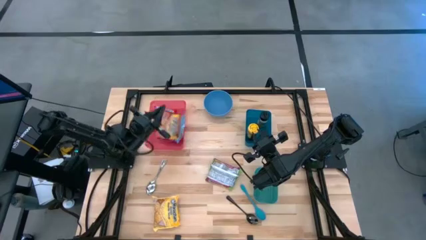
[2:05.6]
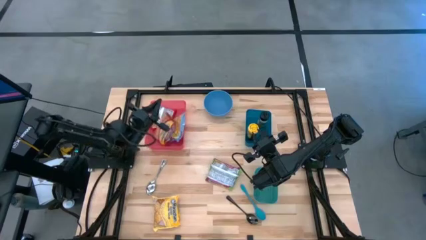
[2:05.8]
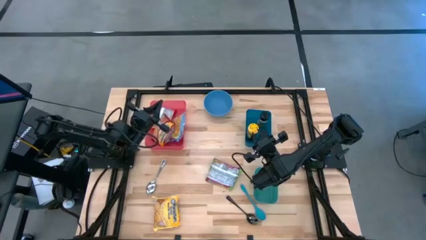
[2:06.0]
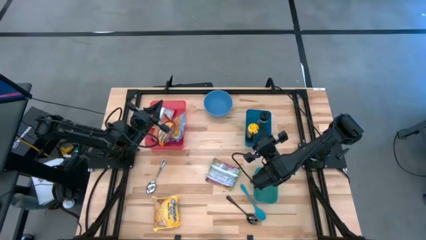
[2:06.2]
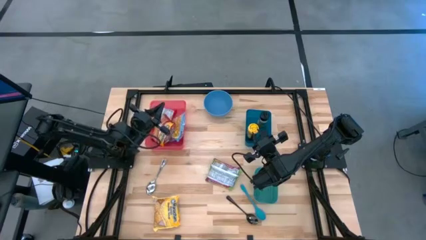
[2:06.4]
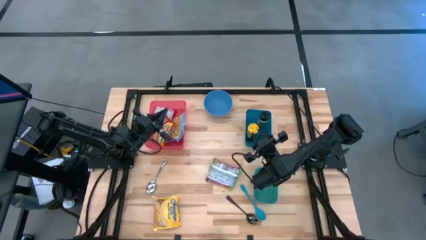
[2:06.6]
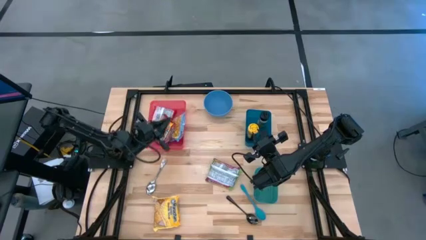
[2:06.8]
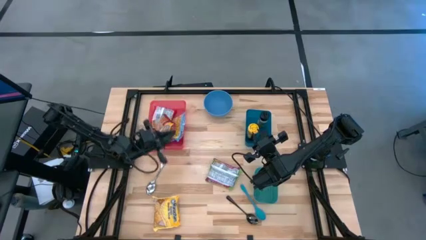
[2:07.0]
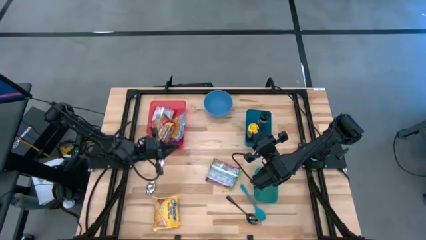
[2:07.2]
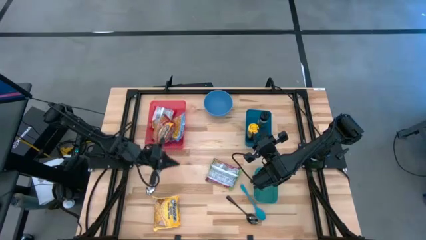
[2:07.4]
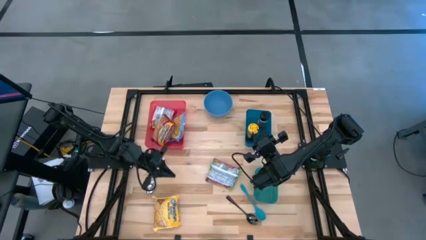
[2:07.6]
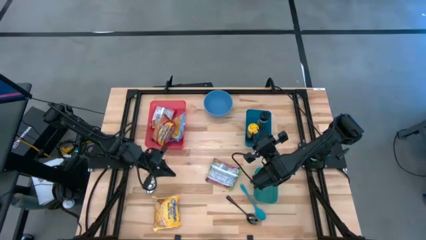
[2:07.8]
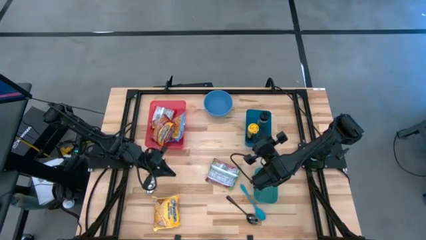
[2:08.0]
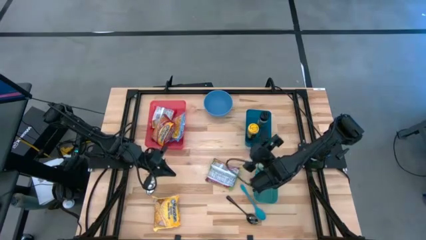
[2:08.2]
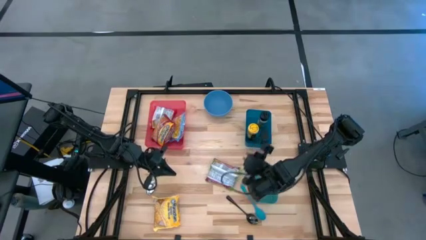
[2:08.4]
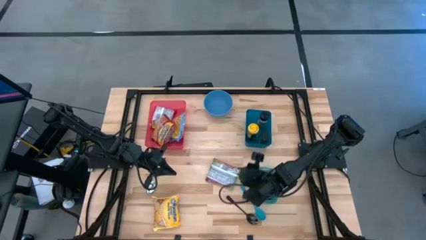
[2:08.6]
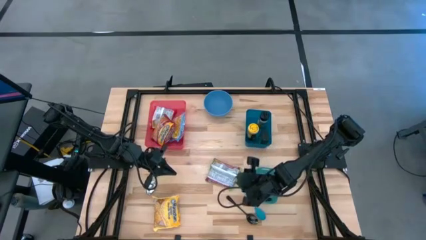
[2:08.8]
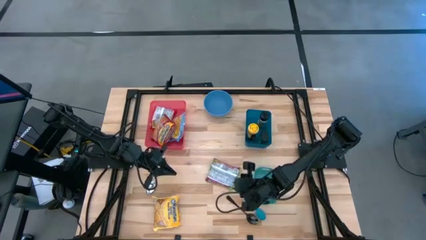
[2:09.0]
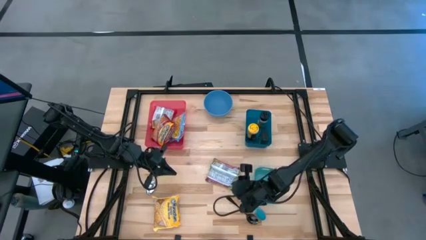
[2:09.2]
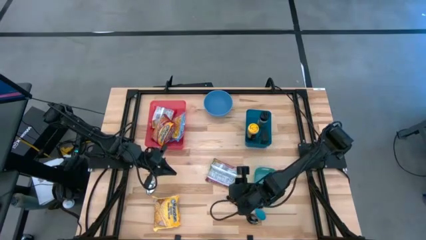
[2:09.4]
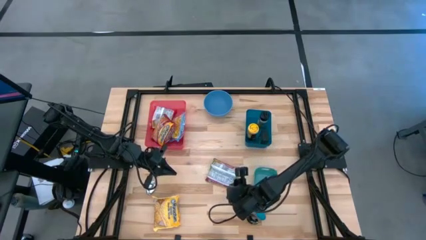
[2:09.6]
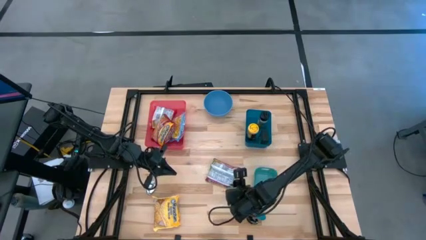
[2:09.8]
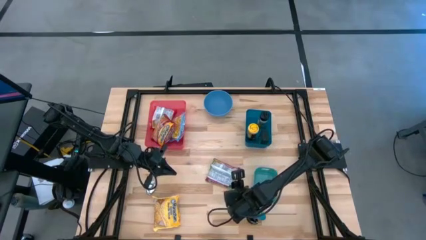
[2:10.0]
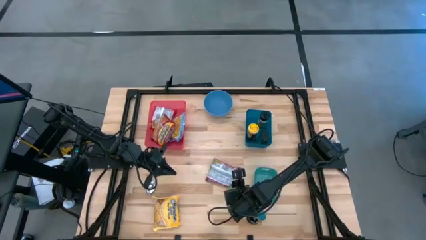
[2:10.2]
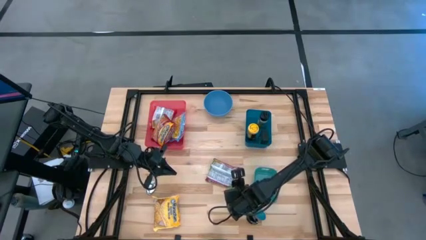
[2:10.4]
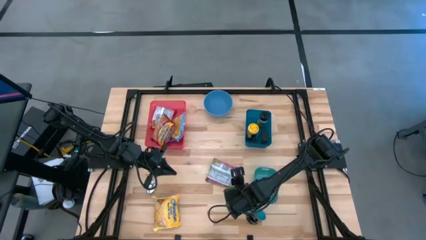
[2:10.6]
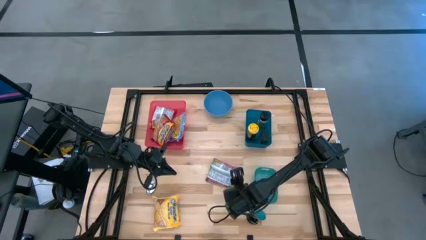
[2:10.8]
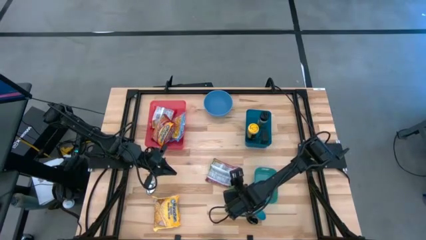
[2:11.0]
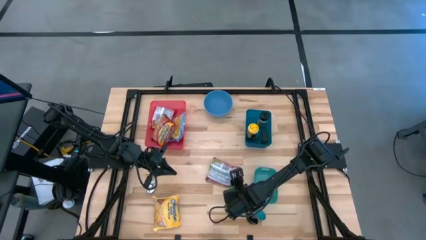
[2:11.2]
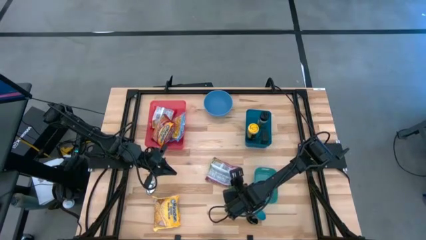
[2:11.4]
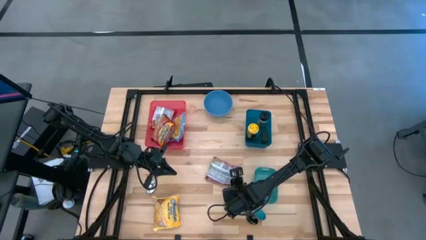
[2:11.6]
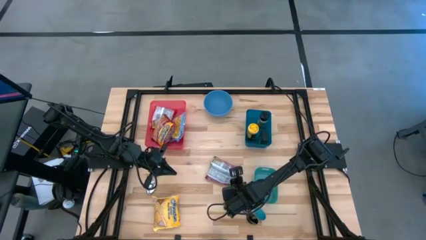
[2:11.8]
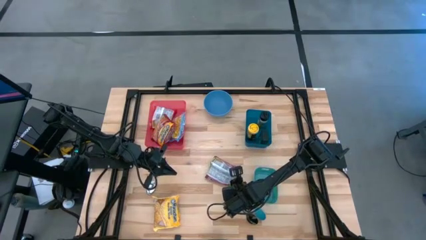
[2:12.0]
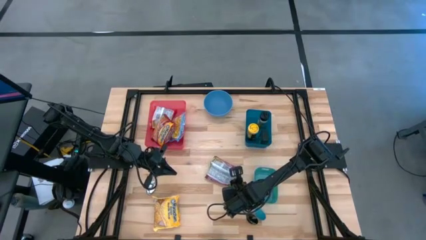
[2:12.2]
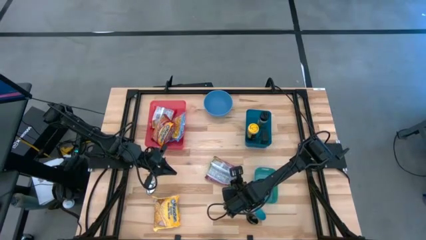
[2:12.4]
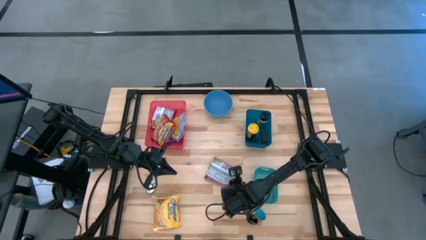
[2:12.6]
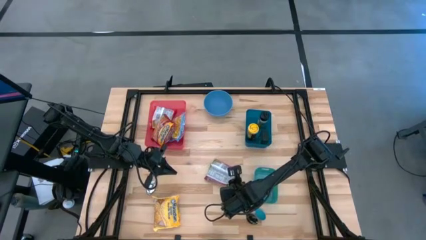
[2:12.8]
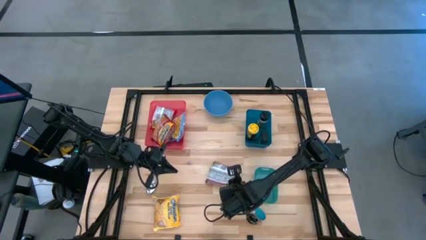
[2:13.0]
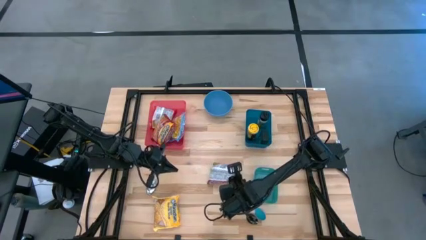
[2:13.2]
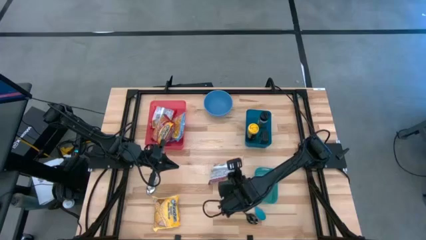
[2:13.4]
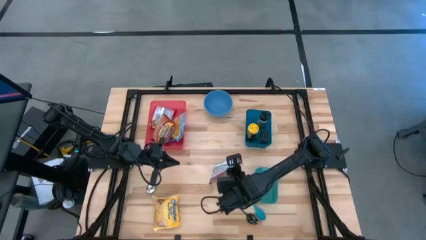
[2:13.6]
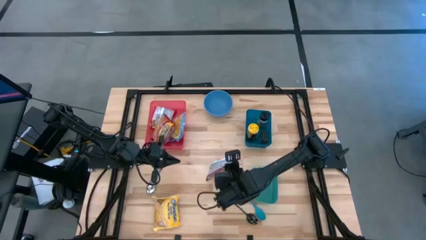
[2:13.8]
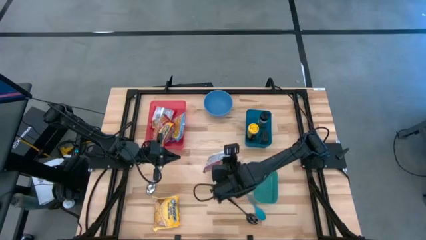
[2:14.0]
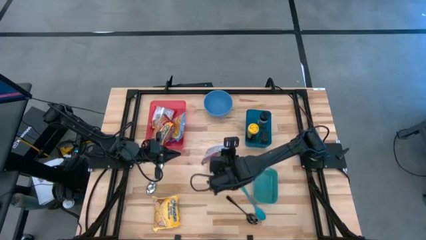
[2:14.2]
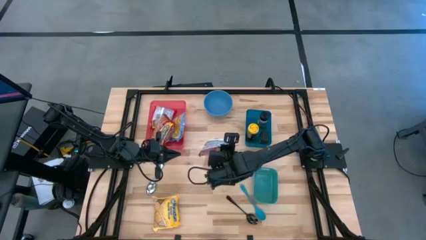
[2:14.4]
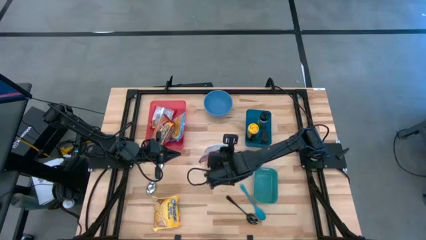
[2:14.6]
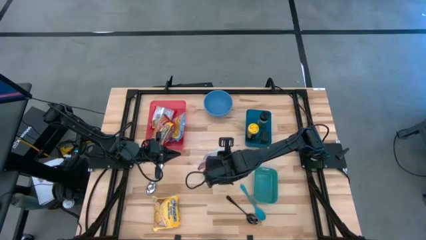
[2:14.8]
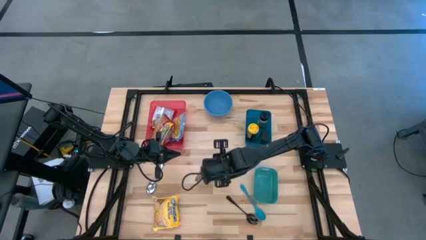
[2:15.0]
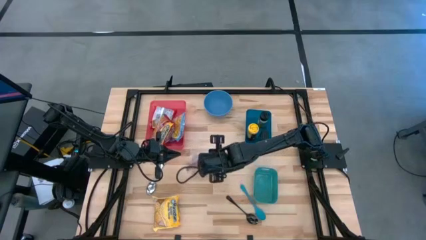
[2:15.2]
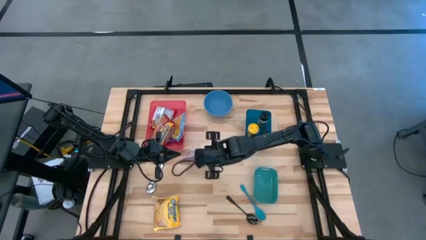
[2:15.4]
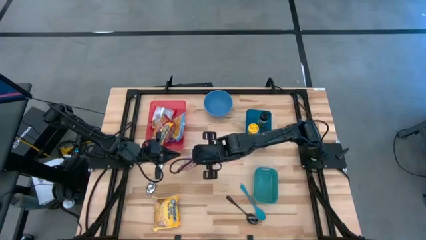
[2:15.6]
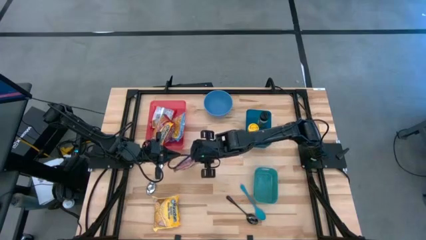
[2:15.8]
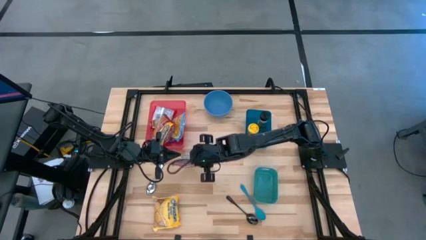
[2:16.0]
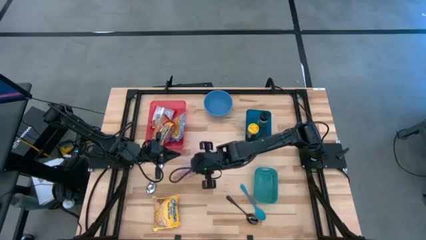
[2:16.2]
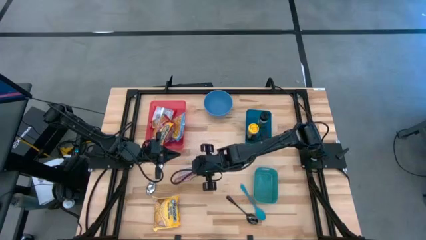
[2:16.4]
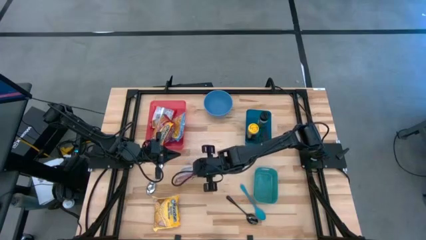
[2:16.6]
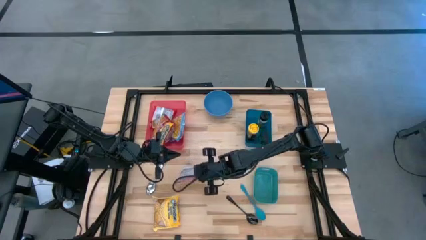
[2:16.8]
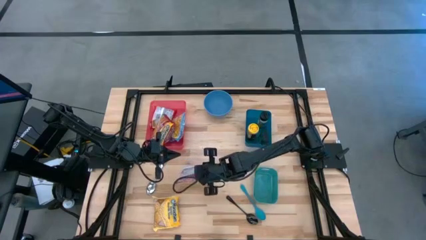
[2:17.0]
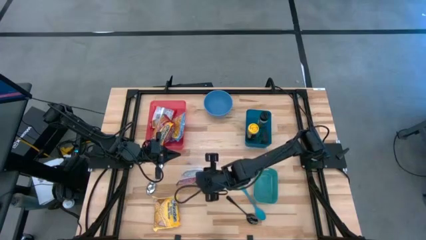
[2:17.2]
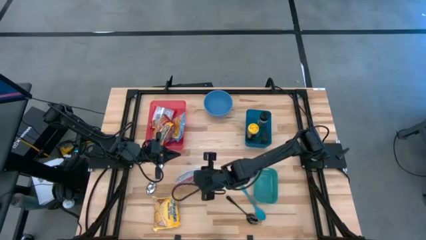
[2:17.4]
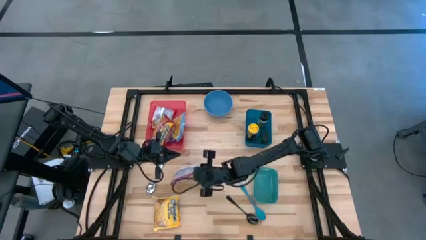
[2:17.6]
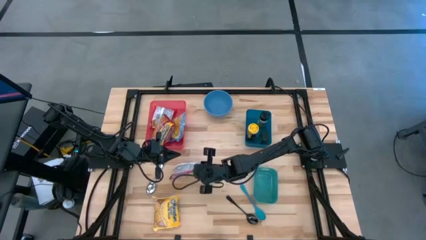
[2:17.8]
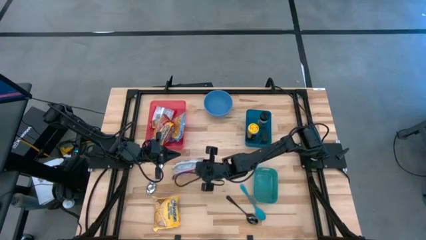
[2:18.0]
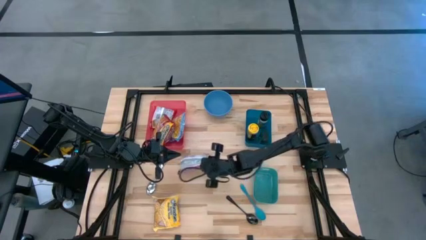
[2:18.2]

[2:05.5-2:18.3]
Task: Pick & Place Food Item
Put the green noodle pack into the red bin

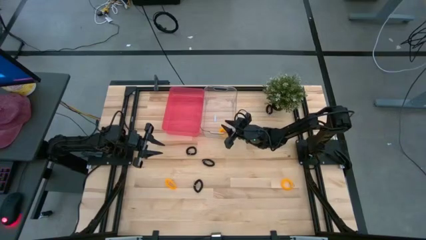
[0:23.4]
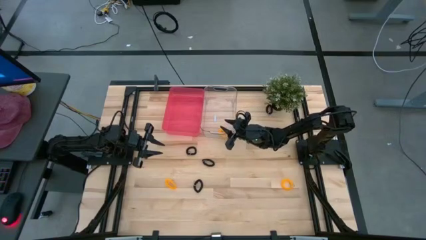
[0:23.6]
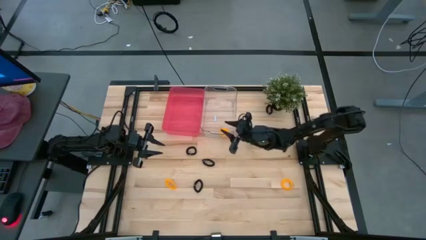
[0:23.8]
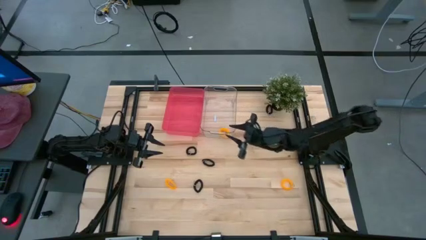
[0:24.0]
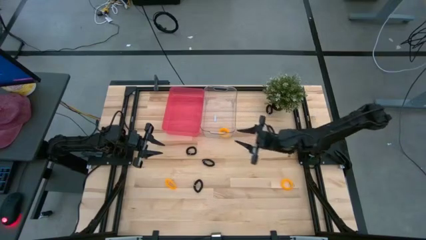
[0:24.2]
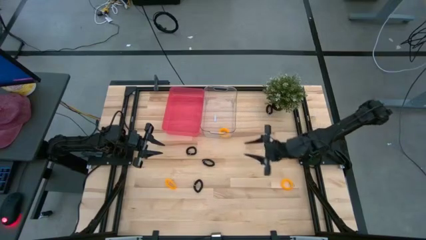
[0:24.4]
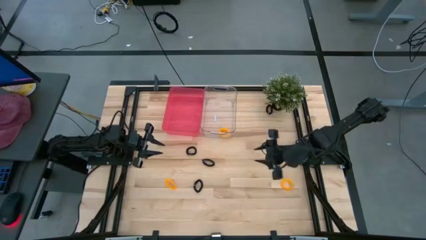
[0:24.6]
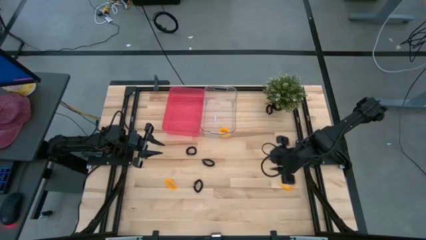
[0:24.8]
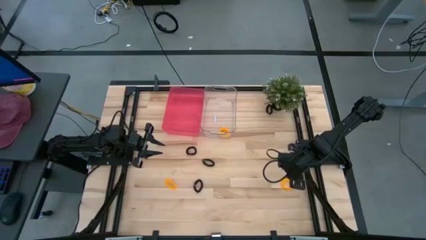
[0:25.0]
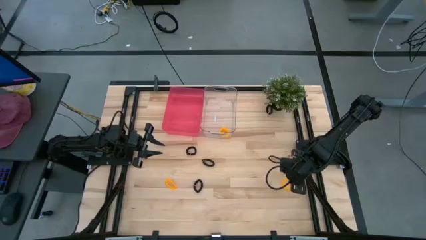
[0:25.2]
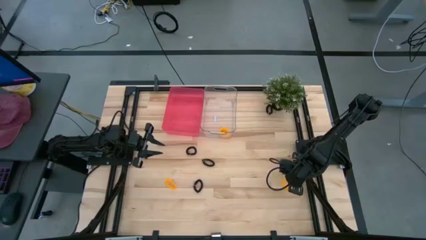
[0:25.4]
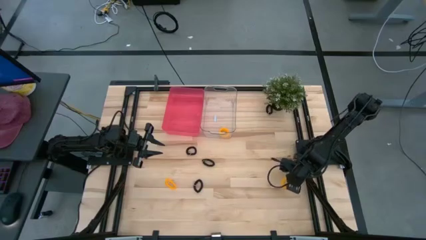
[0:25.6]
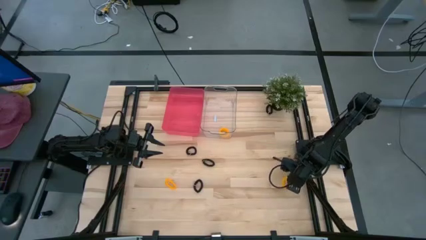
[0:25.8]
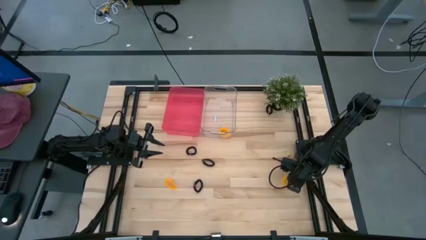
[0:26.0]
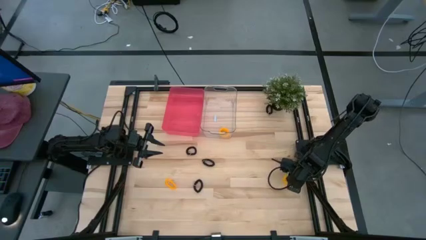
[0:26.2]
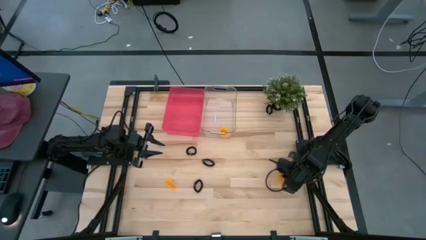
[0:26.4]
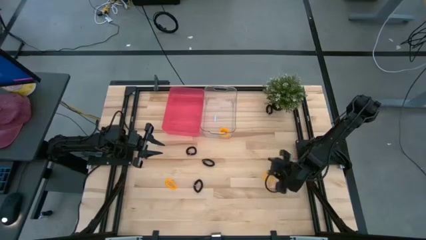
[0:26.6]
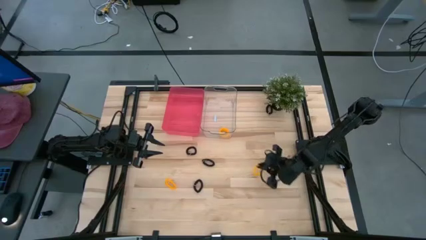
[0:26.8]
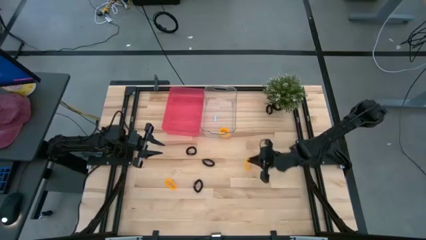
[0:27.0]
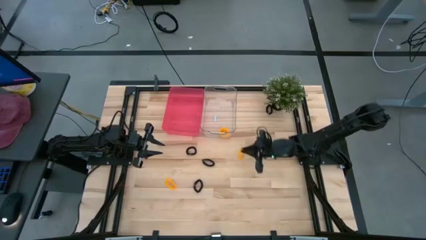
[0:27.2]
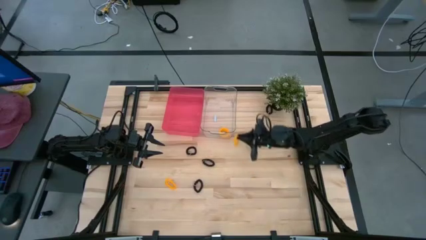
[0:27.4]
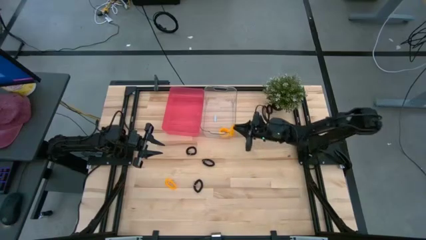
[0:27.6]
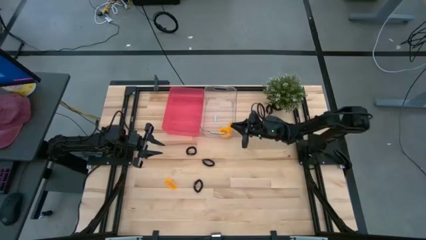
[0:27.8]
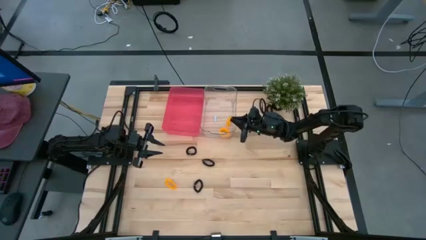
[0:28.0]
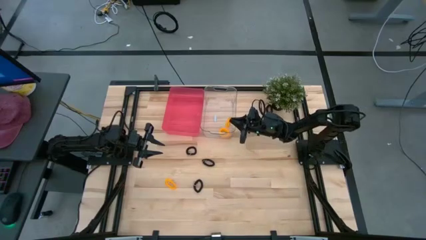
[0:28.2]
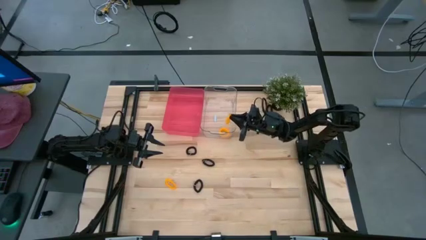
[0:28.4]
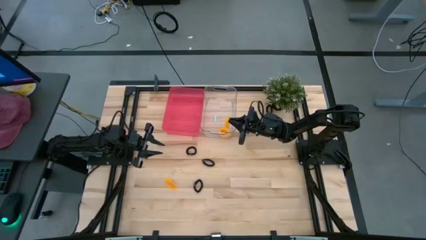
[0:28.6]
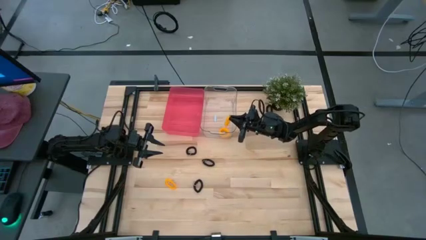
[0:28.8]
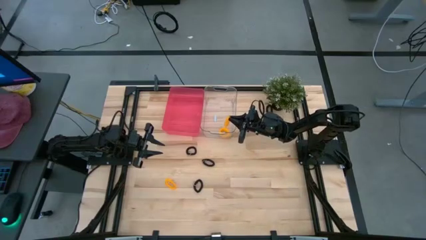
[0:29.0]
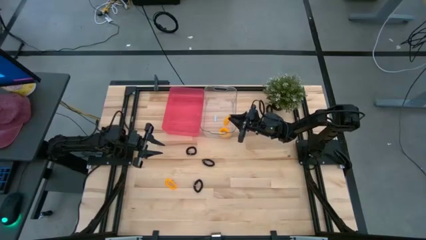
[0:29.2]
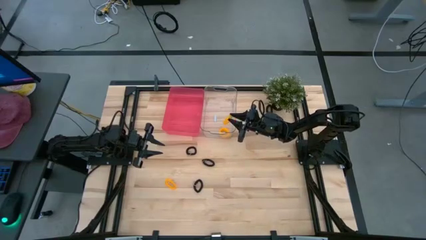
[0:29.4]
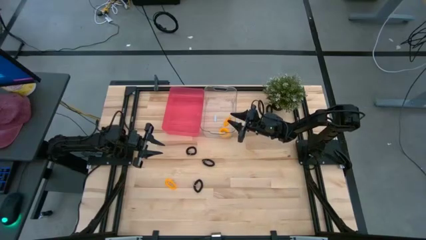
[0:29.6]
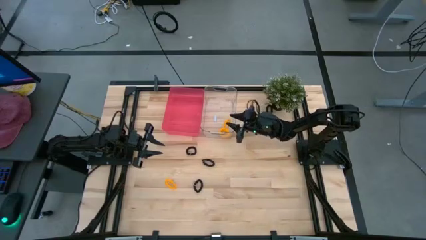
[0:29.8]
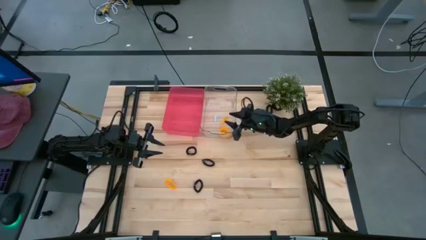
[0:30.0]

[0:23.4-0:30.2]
Task: Sort spring keychains
Put the orange spring keychain into the transparent bin
